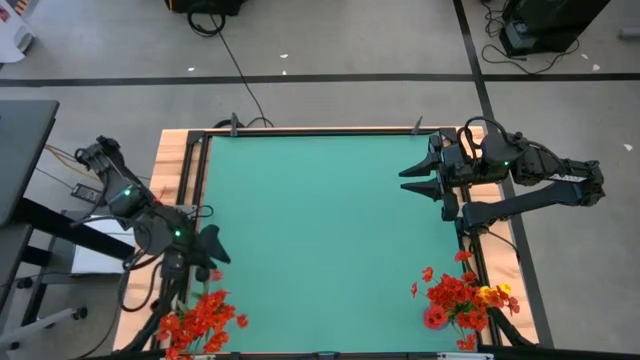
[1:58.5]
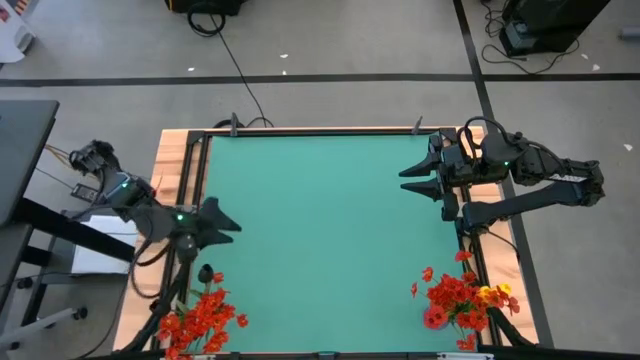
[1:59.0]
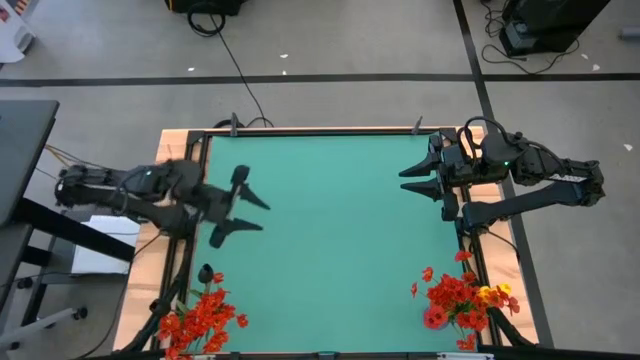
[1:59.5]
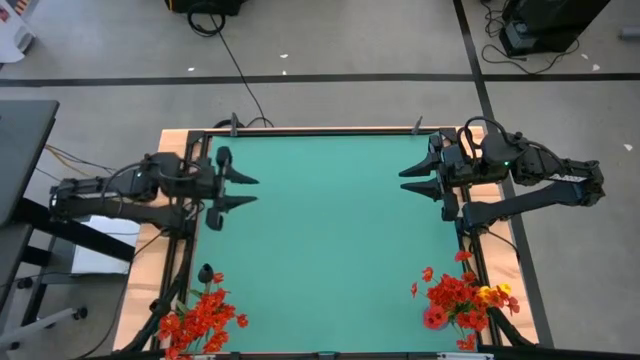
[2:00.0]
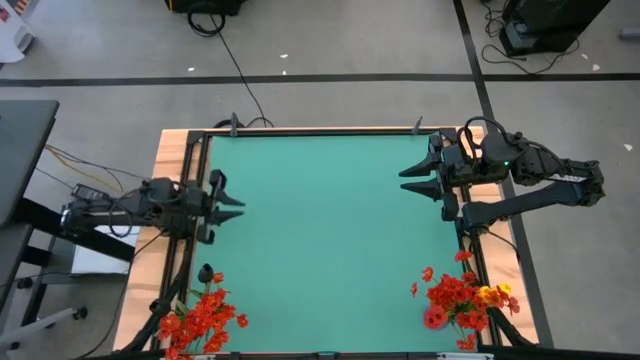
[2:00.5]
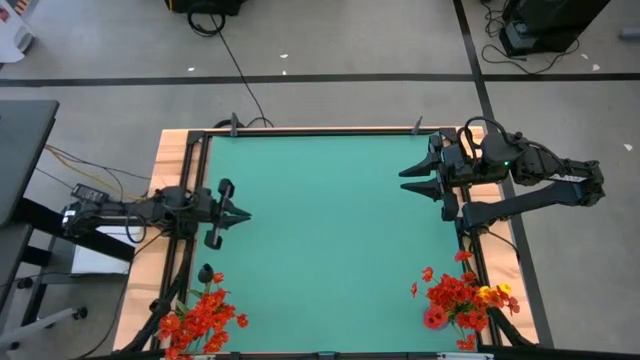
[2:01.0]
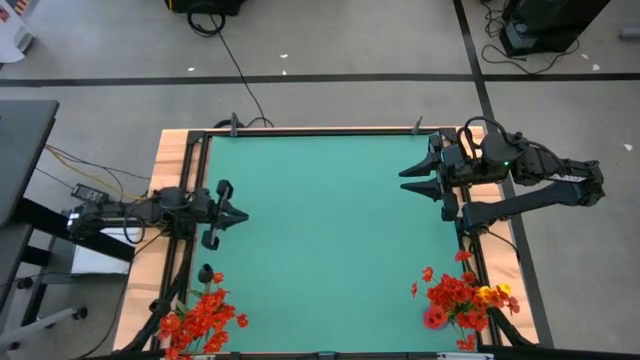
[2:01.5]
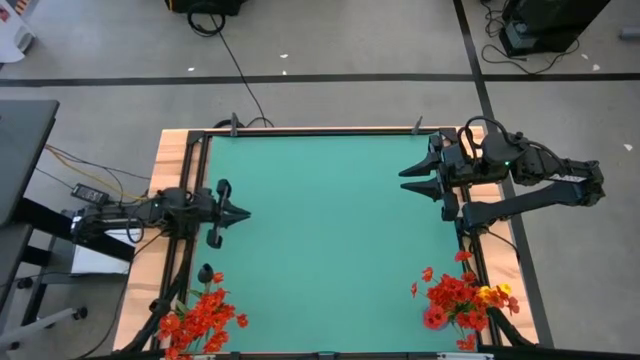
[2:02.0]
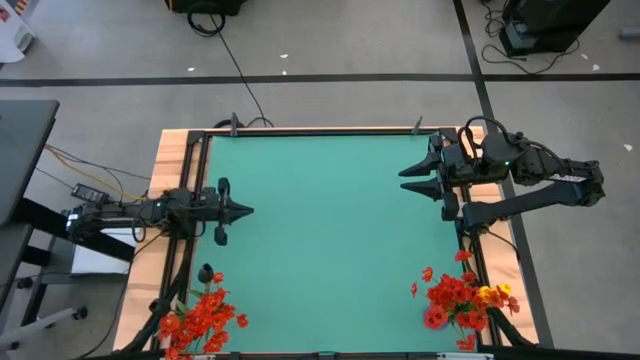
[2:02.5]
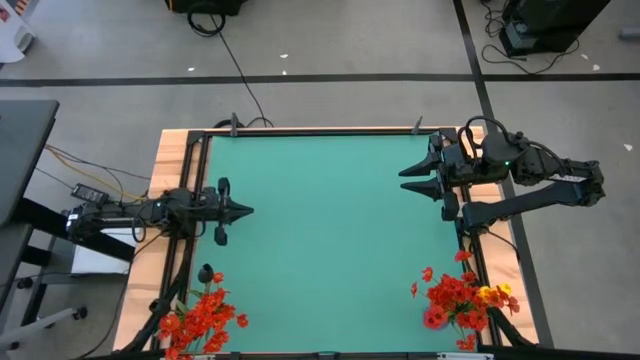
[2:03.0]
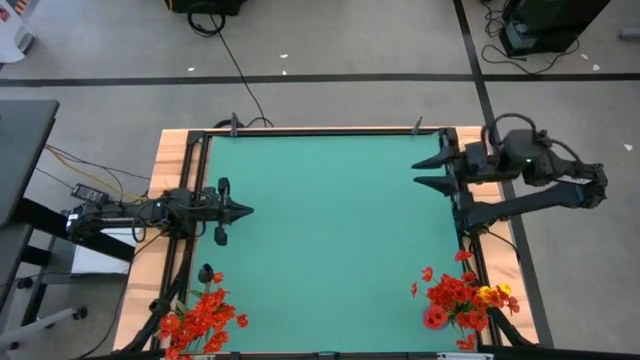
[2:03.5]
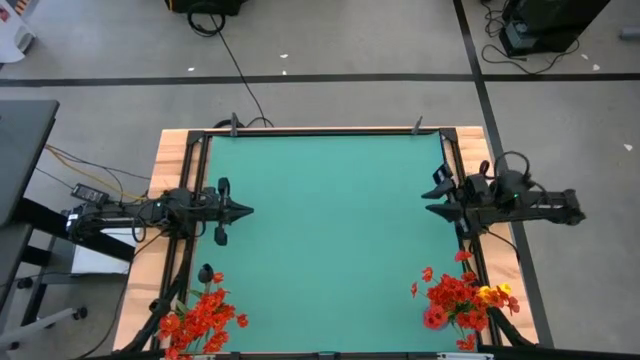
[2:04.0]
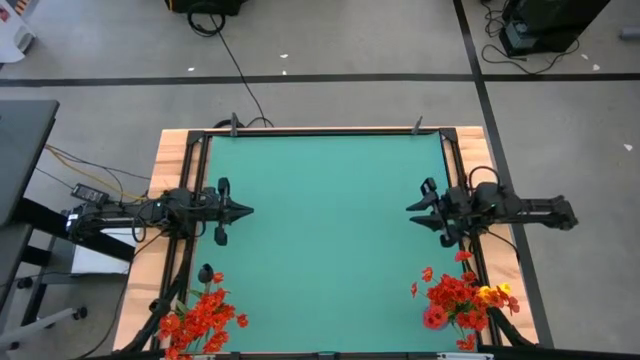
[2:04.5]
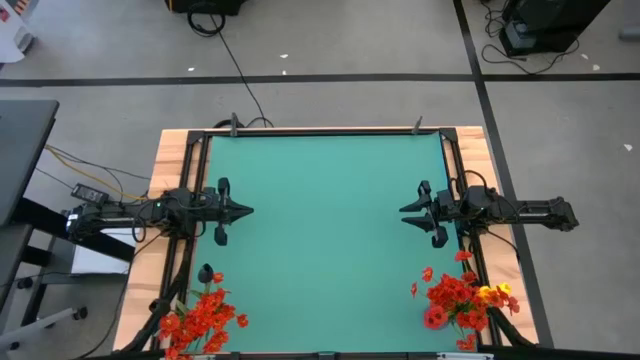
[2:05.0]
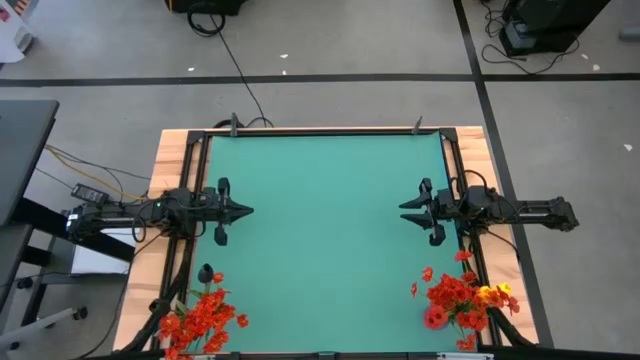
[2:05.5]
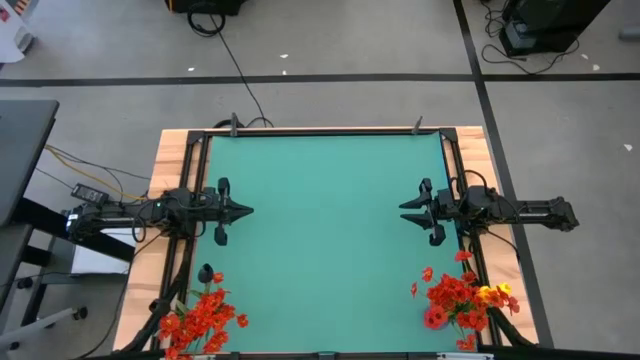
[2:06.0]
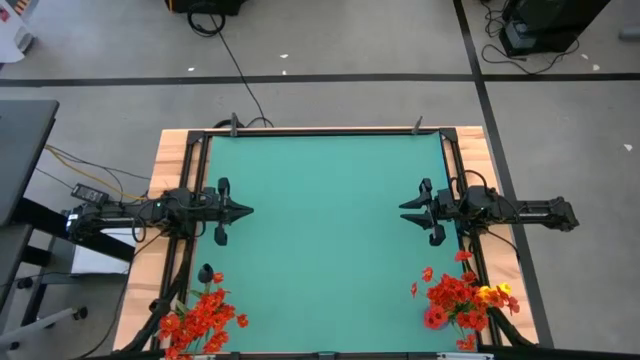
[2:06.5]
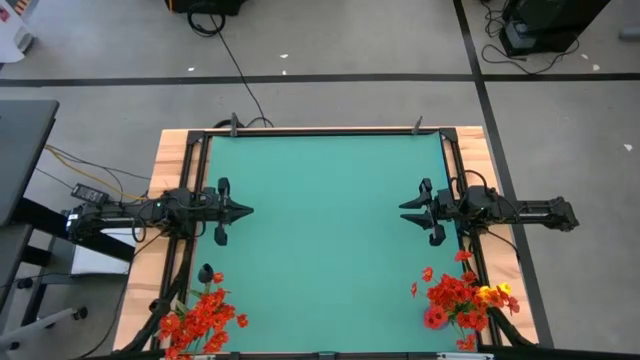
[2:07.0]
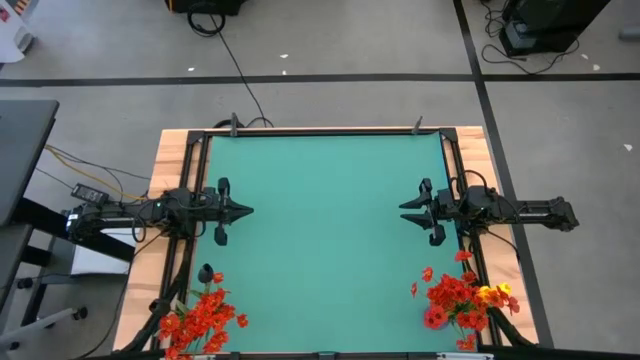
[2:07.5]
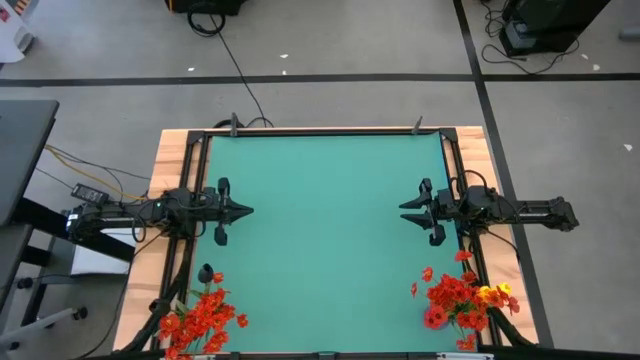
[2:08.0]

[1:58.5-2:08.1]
Task: Sort flowers into vase by color
Return to Home Position

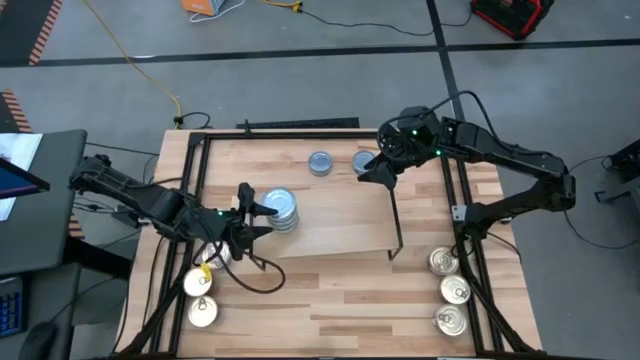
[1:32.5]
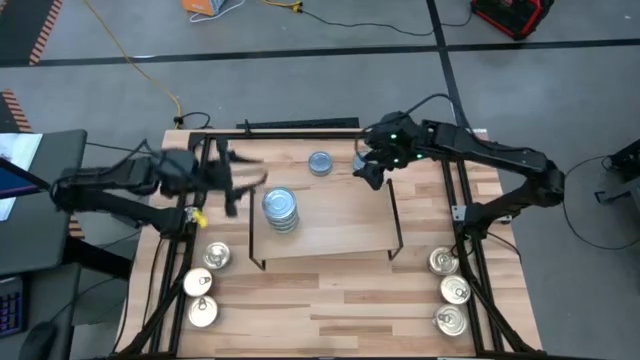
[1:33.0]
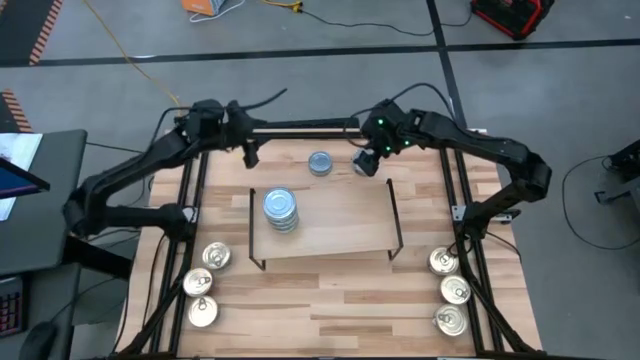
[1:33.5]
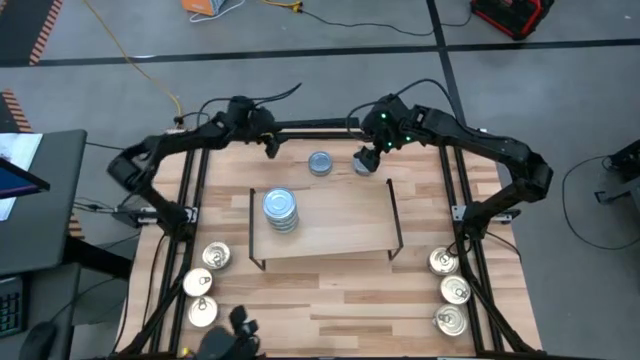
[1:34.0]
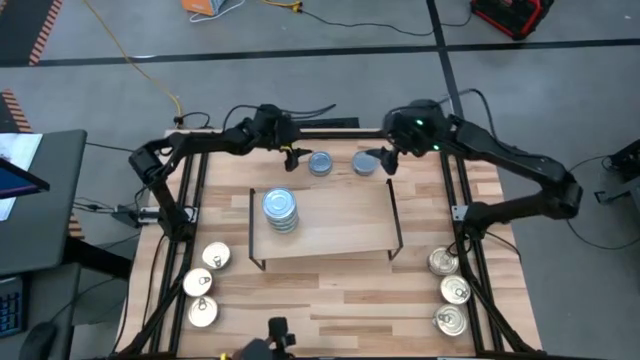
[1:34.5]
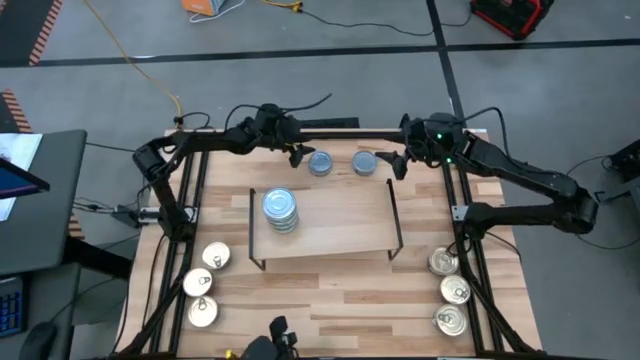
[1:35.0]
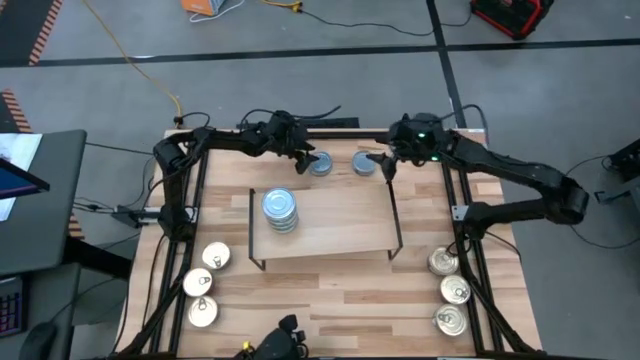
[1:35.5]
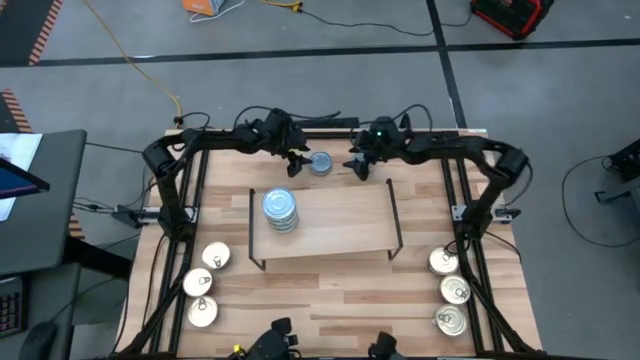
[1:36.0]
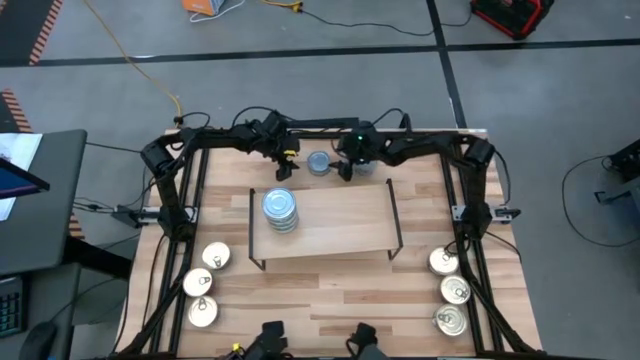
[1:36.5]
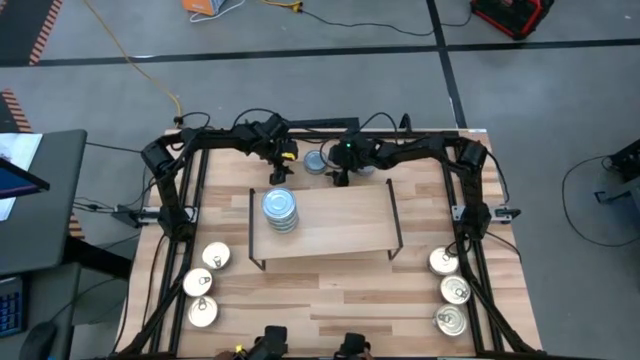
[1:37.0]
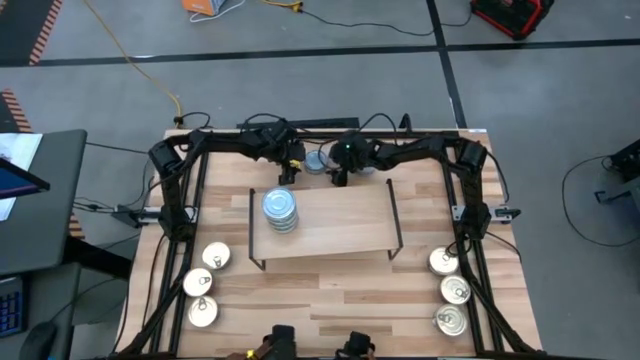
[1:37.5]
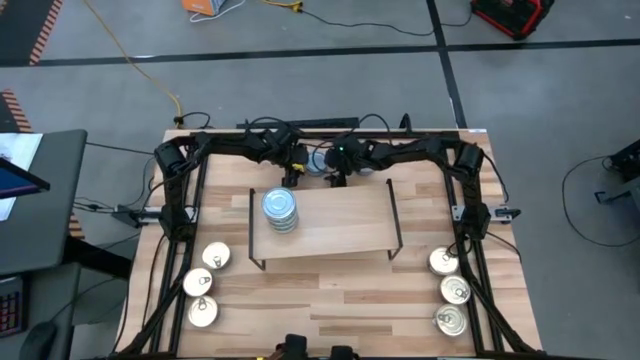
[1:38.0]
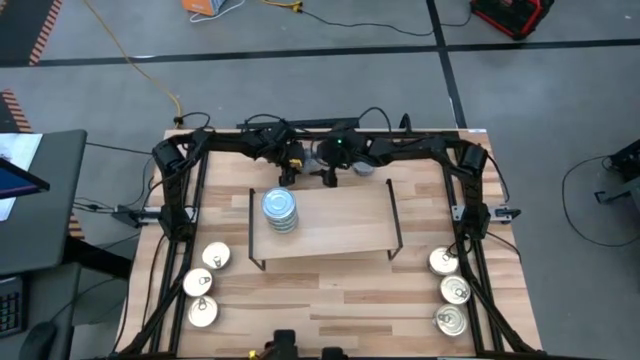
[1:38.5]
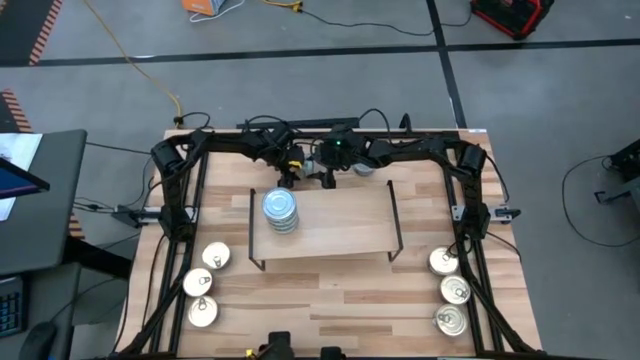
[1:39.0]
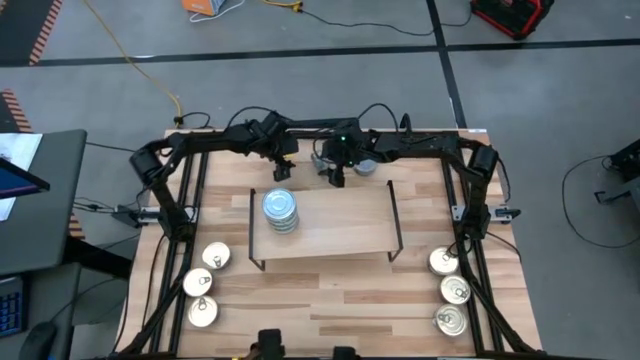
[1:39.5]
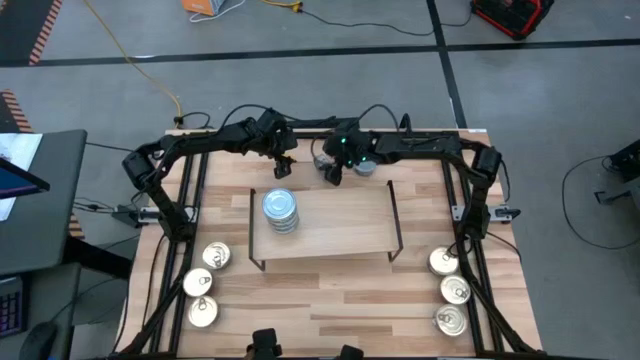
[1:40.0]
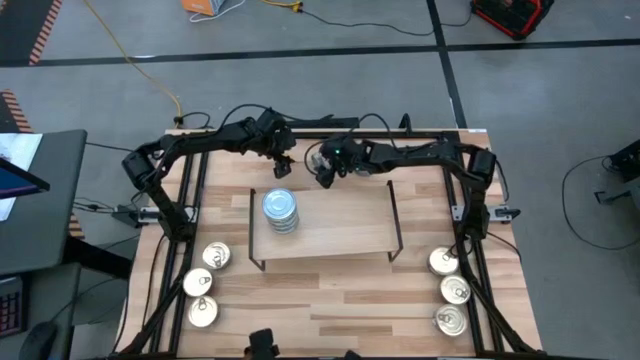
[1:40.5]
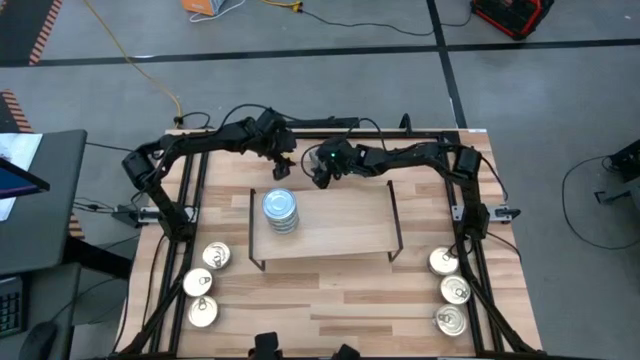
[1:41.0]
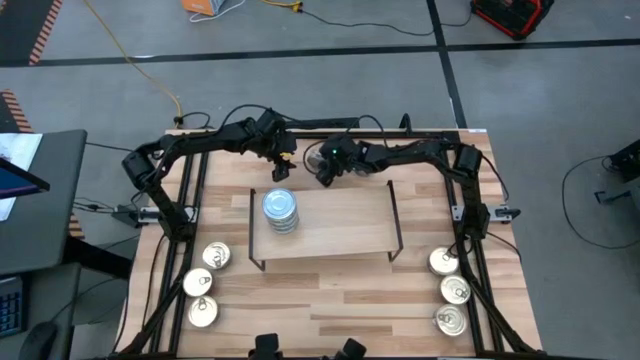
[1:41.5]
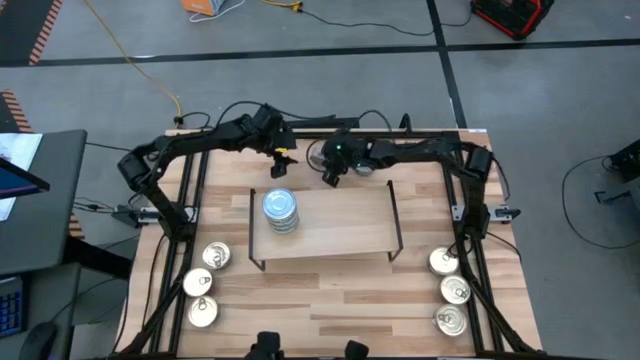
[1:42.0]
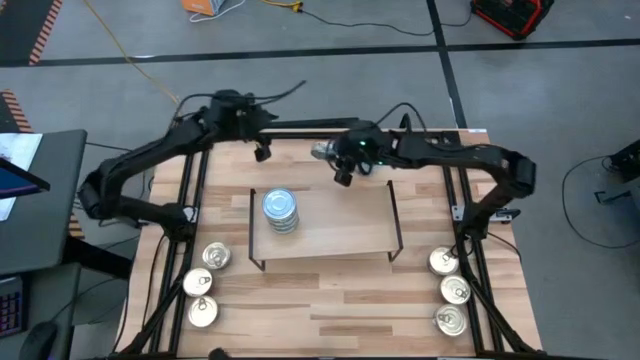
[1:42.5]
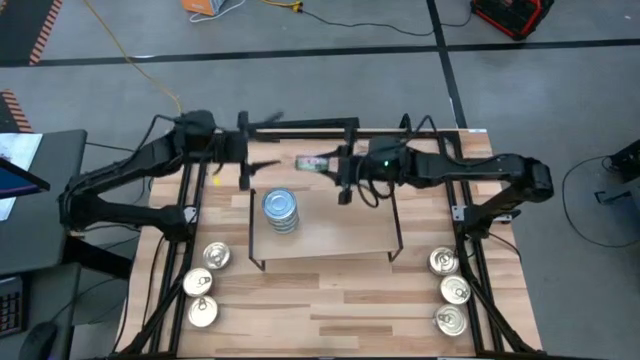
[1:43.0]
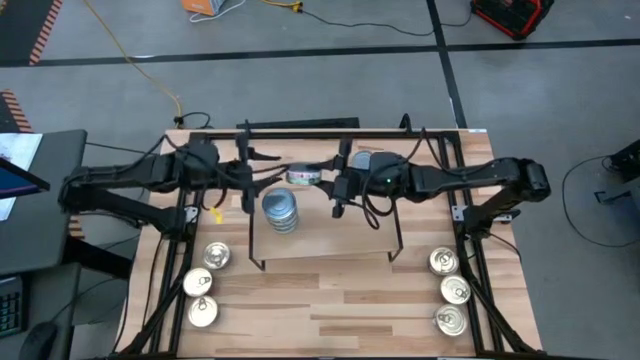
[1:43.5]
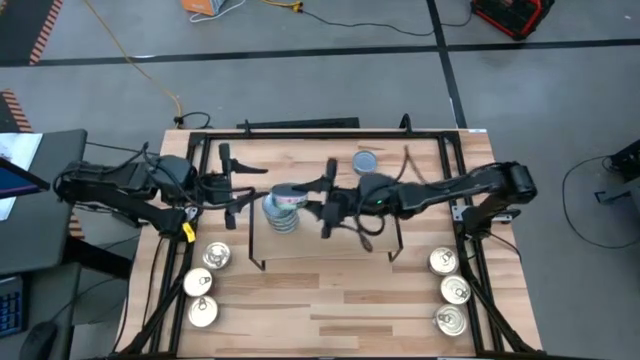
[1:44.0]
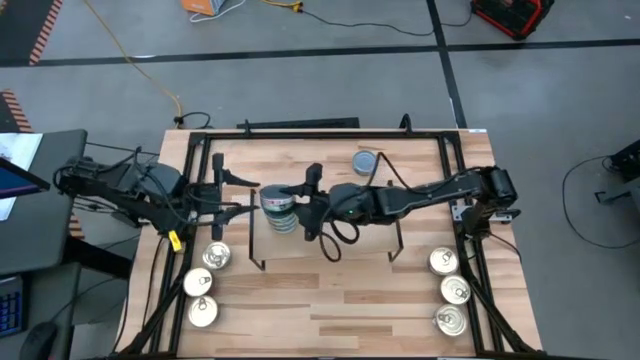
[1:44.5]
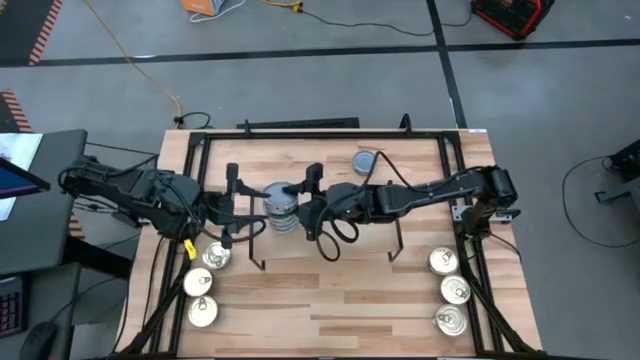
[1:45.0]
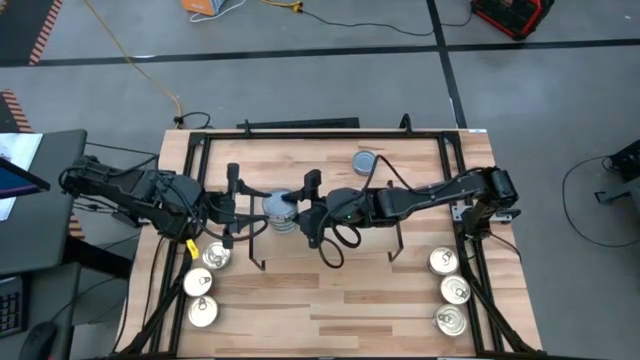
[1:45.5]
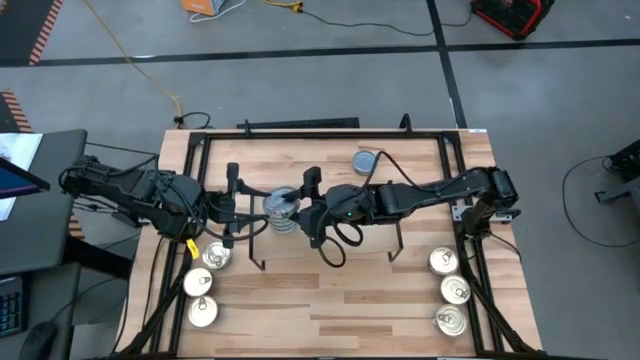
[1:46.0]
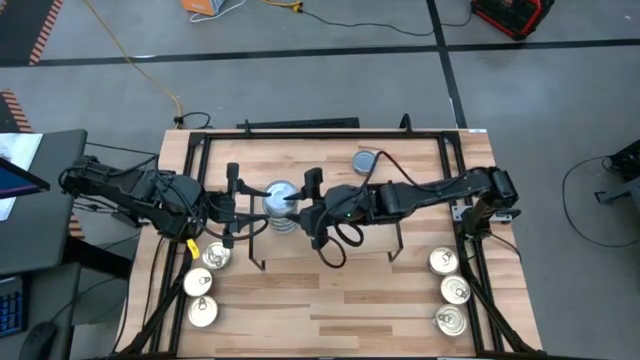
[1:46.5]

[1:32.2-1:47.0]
Task: Stack canned seafood by type on shelf
Stack the green tuna can on top of the green tuna can on the shelf
